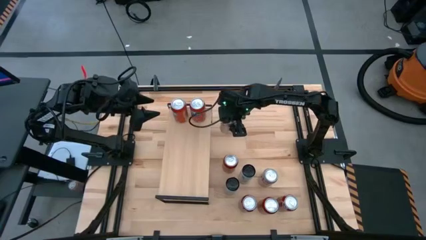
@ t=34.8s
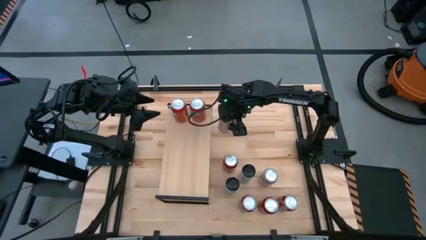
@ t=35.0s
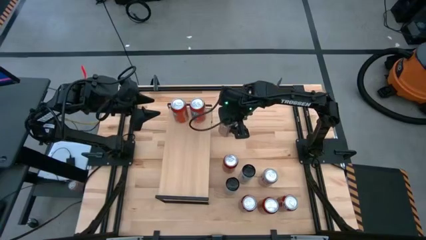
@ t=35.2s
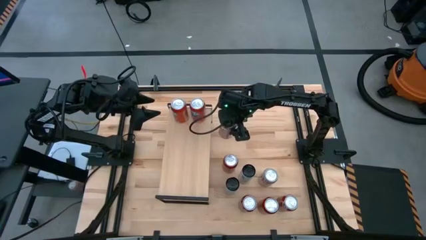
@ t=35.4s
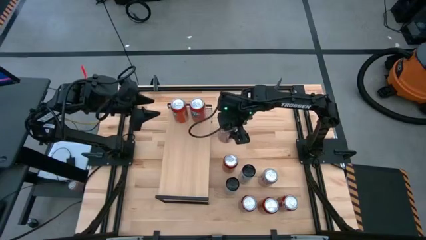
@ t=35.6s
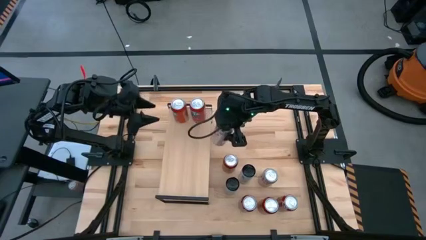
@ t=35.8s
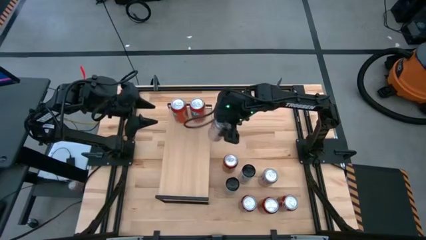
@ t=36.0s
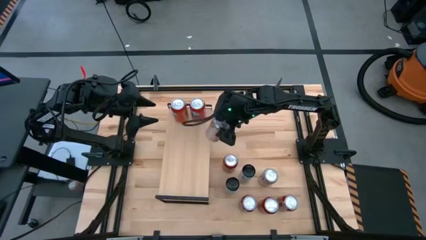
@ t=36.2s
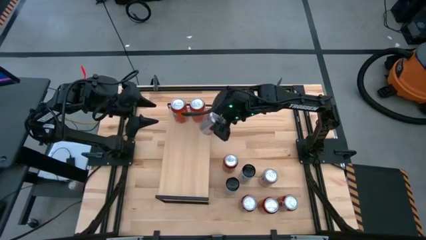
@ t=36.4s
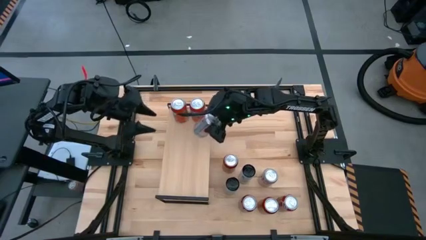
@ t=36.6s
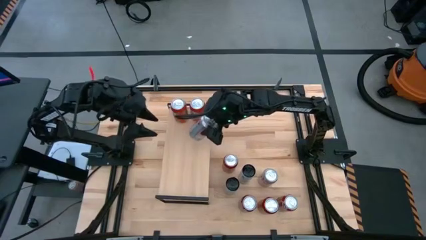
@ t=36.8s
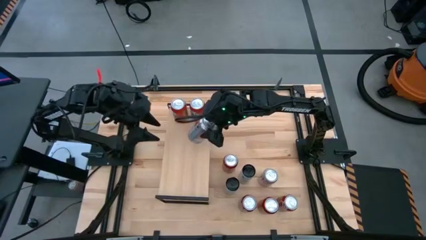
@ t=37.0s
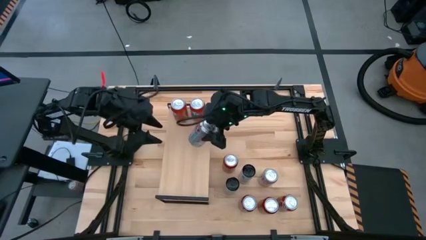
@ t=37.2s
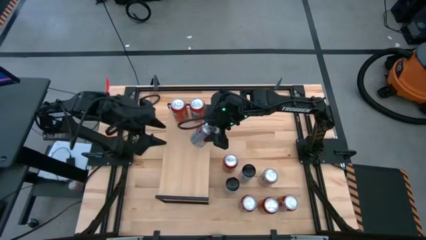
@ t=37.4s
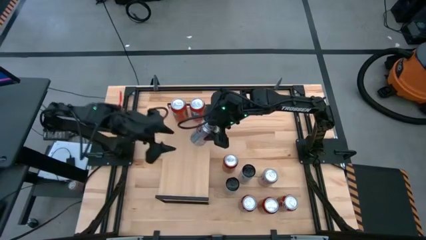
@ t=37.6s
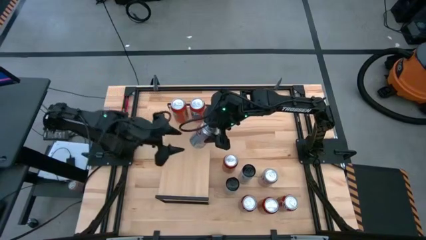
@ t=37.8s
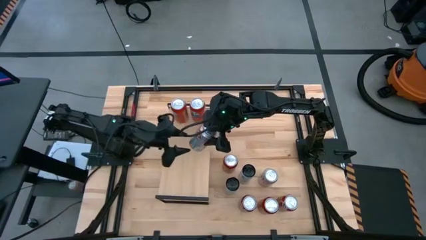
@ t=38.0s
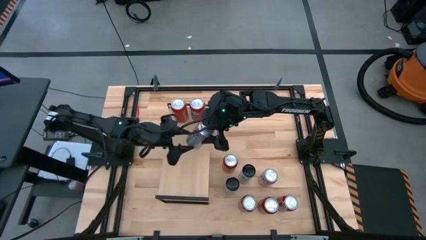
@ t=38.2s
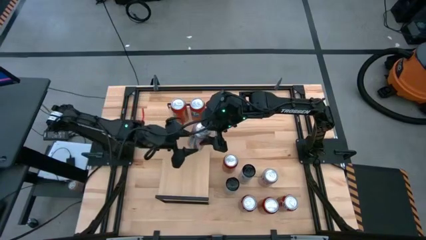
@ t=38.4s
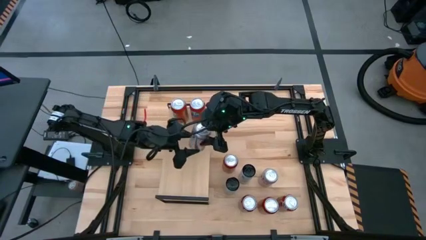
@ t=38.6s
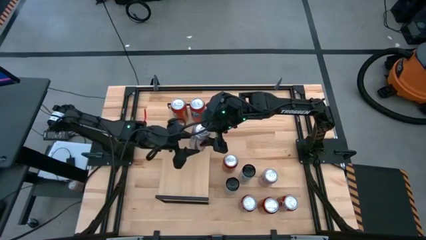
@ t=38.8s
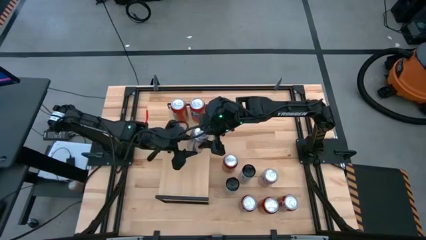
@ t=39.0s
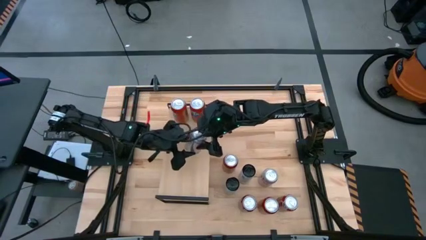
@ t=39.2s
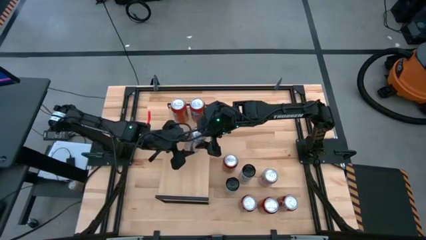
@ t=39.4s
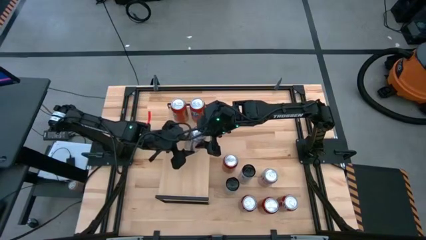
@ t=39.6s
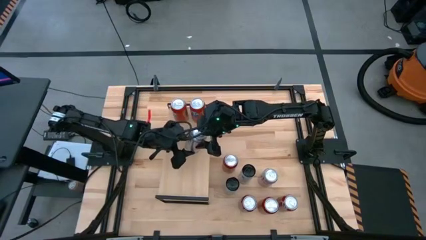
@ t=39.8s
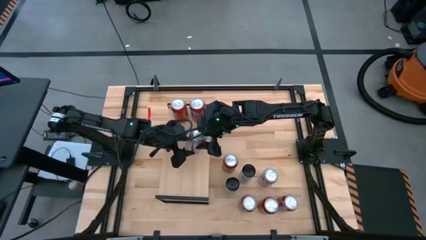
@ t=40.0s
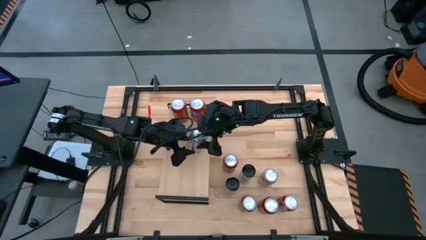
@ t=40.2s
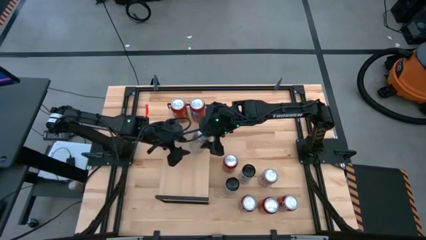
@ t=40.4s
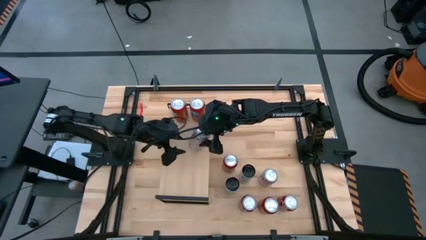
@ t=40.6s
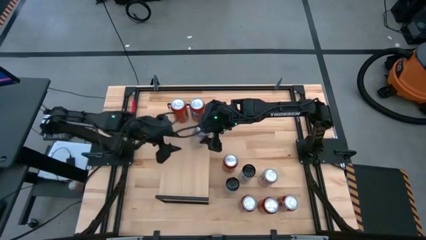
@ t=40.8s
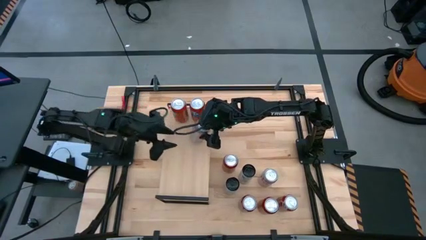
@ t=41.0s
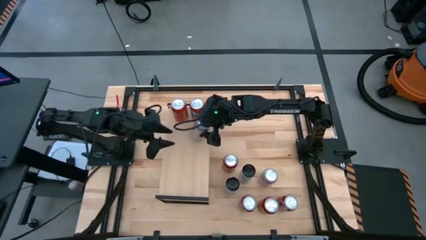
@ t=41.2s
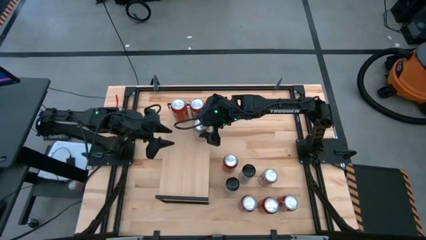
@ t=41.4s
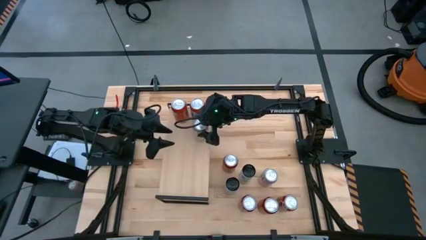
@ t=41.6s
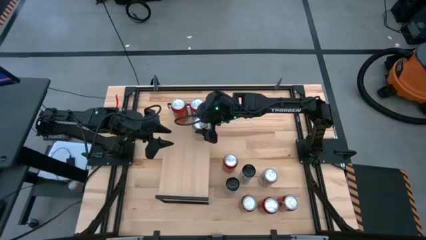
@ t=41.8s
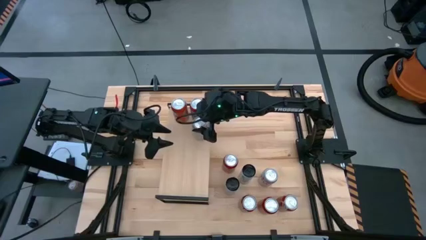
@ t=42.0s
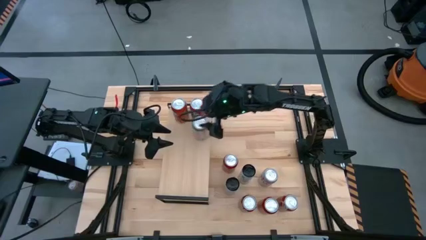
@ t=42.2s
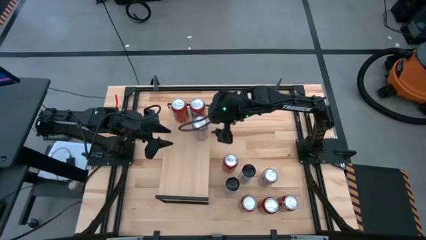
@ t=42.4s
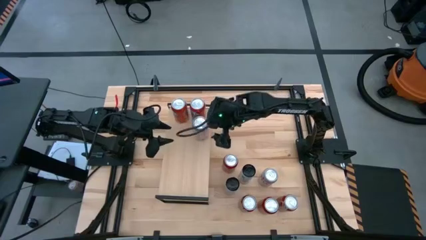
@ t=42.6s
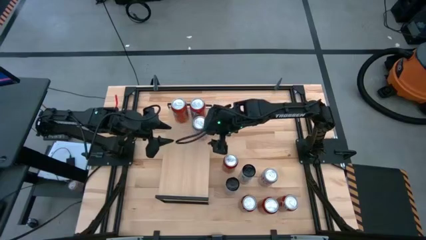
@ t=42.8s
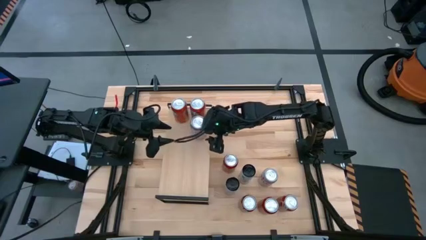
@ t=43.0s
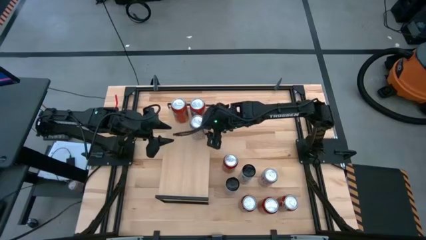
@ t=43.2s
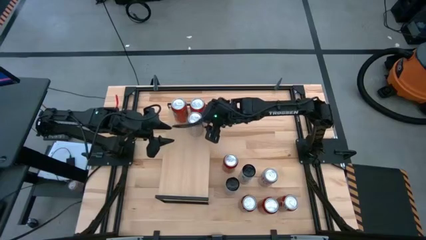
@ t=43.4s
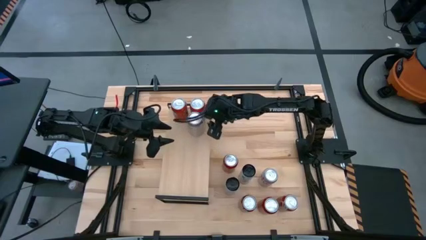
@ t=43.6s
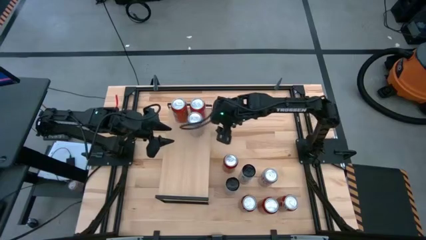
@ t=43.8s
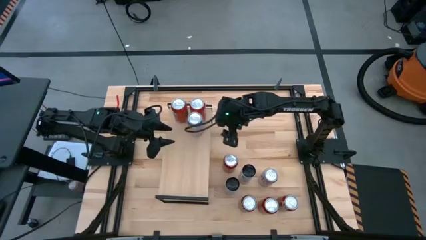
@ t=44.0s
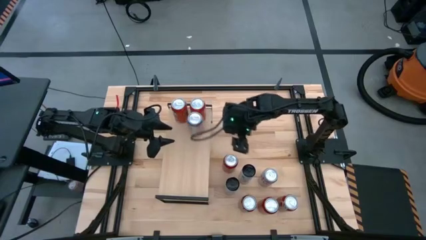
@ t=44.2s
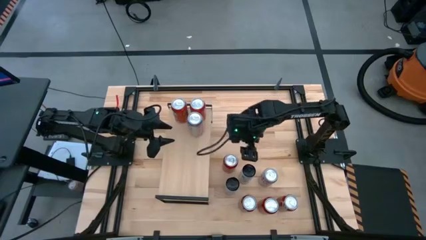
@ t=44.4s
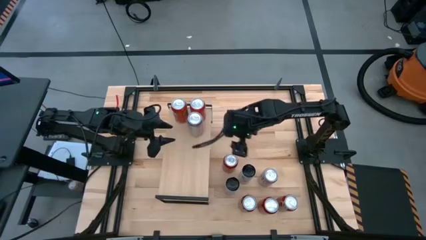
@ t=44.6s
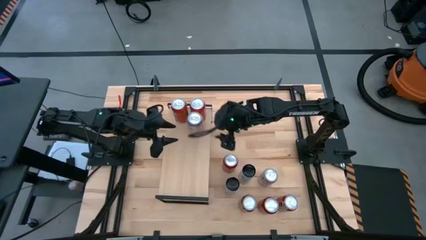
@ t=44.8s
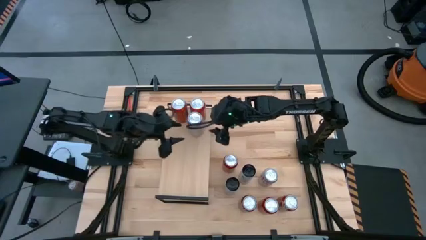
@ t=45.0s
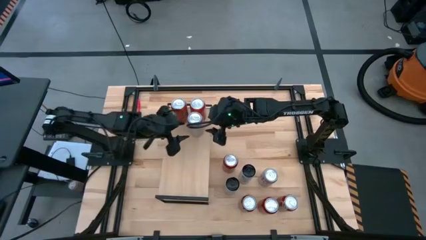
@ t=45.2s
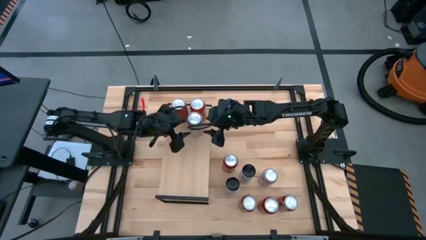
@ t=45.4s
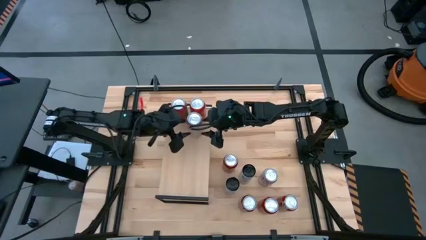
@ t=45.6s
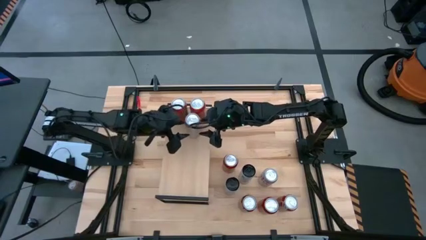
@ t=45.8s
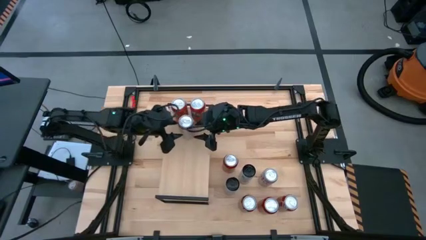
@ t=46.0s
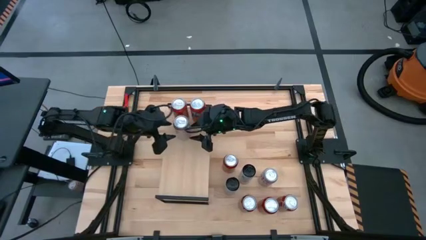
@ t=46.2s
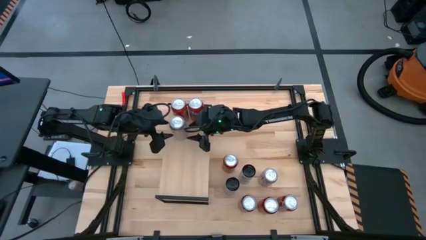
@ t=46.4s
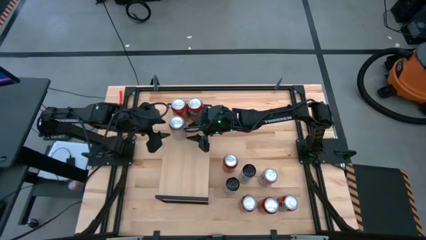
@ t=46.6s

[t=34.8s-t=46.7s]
Task: Pick and place cans onto a shelf
Put the top red-silver soda can on the shelf

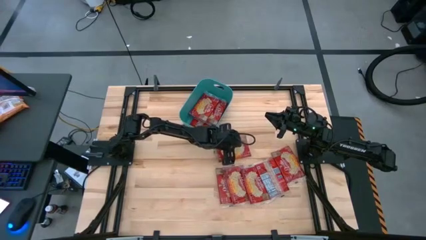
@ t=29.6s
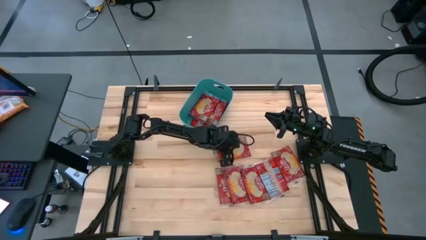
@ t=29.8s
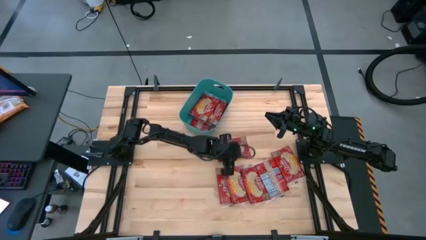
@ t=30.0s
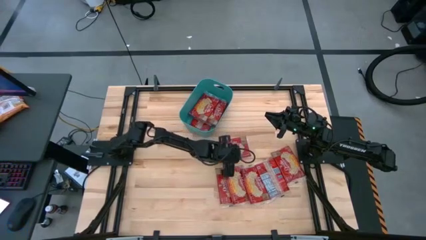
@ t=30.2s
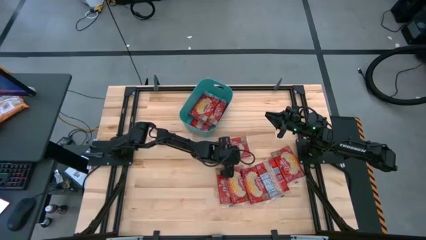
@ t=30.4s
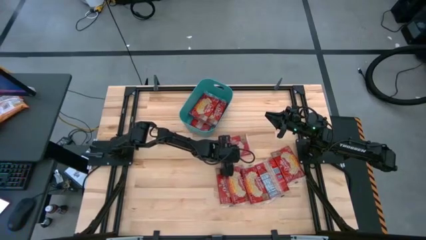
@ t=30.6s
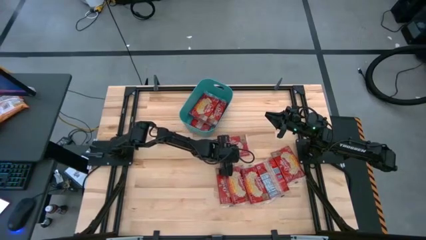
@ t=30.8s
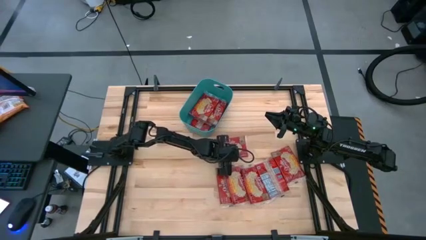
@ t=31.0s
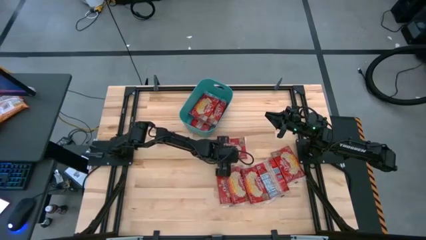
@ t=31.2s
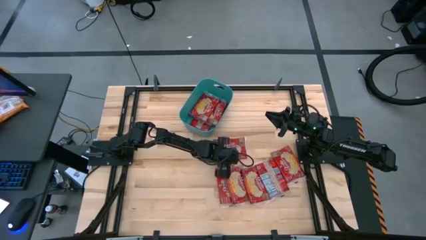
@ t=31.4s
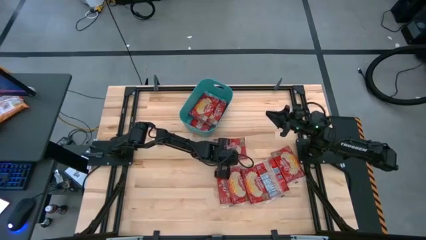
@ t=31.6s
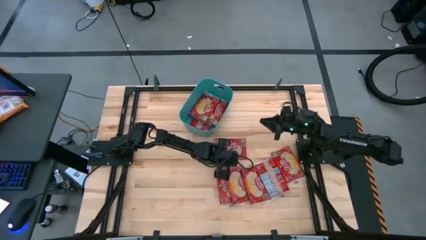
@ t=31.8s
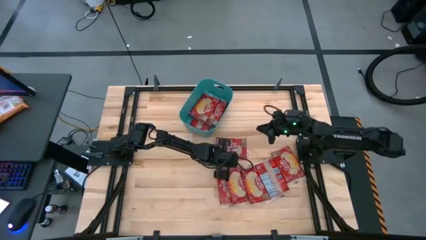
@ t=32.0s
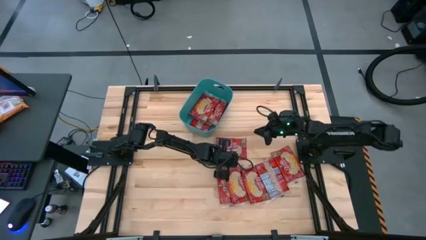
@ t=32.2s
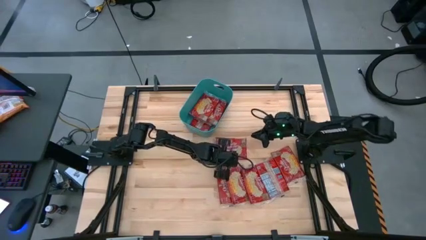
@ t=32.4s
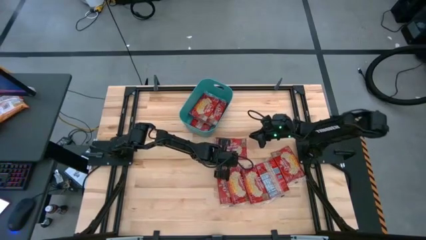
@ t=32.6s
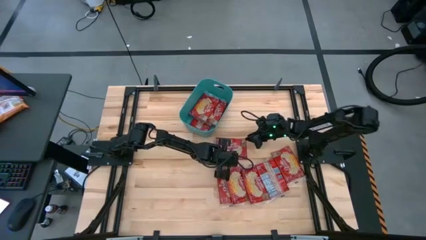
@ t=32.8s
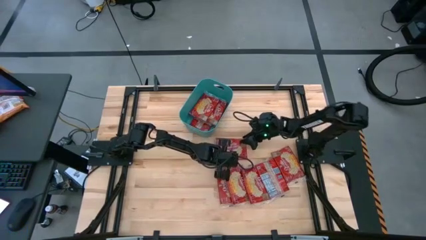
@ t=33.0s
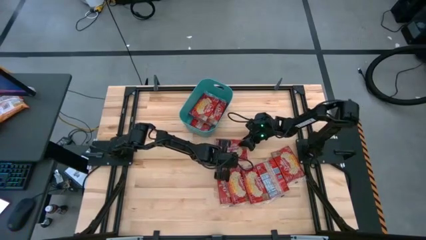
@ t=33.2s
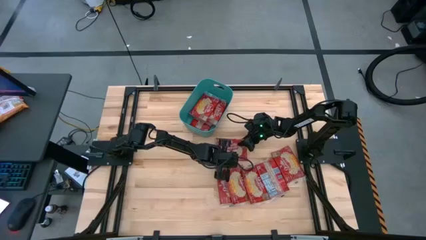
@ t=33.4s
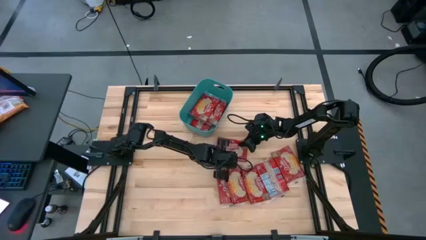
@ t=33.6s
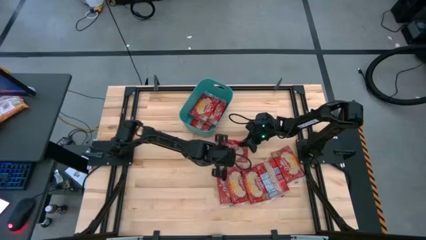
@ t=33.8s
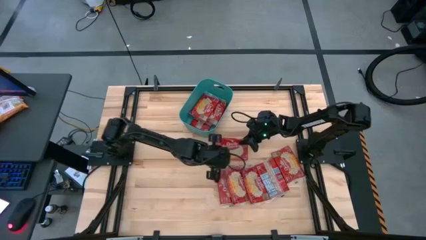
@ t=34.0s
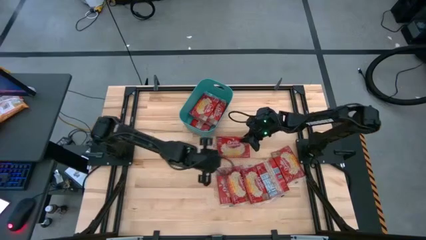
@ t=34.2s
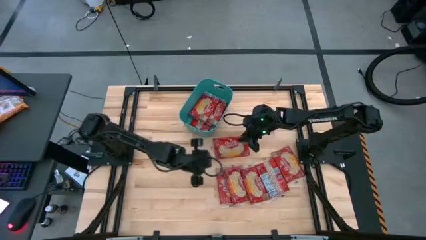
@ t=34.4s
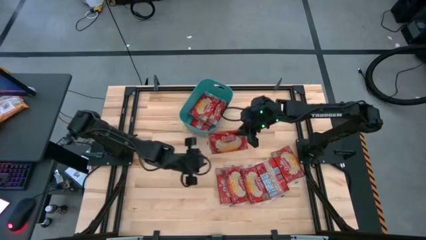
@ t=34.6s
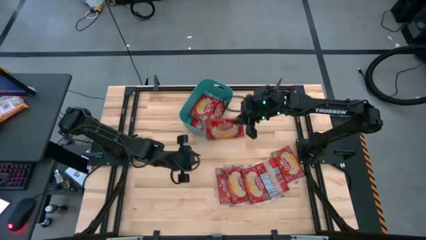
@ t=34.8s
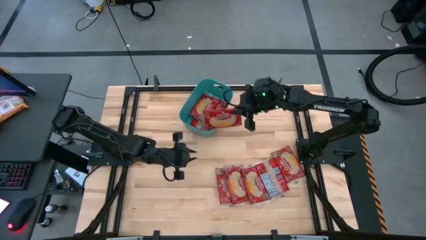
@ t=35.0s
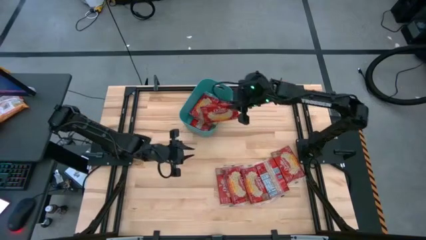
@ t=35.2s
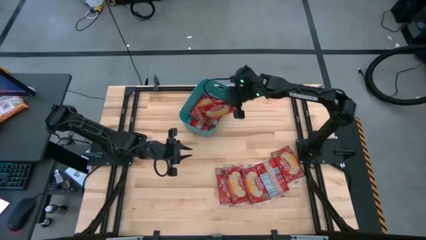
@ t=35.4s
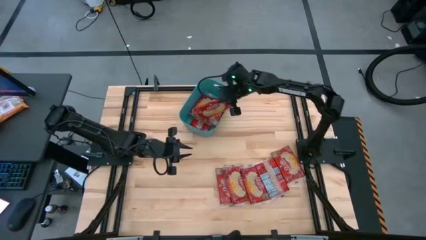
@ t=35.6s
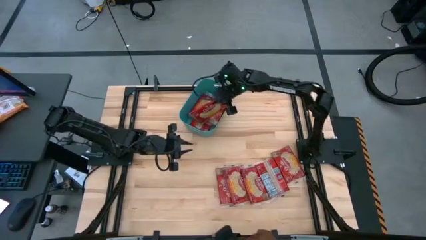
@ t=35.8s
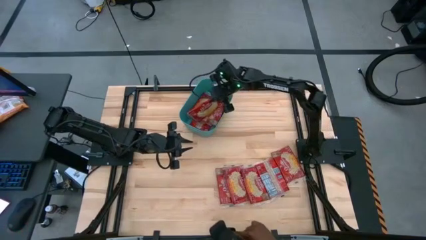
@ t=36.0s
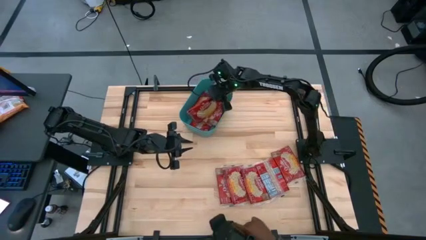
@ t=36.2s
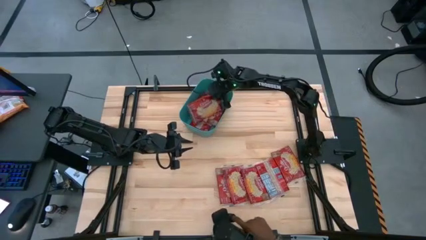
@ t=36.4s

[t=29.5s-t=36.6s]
Task: Sort popcorn bags into baskets
Put the popcorn bag into the green bin
